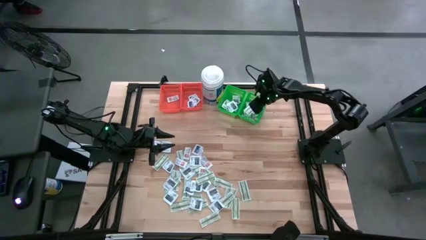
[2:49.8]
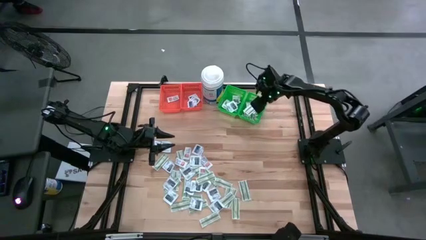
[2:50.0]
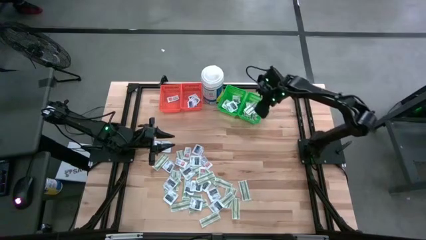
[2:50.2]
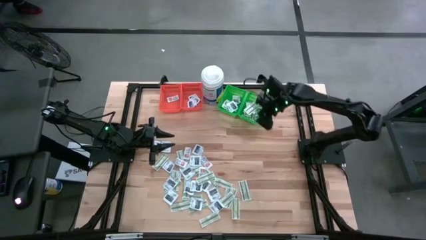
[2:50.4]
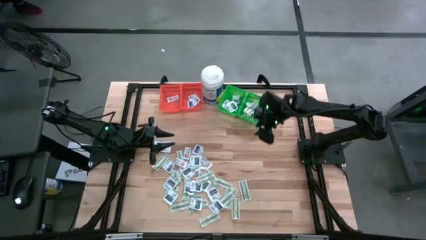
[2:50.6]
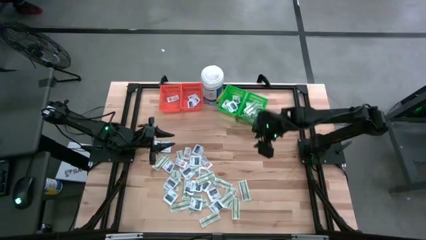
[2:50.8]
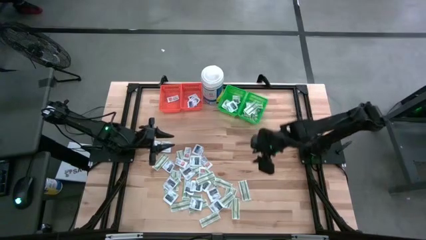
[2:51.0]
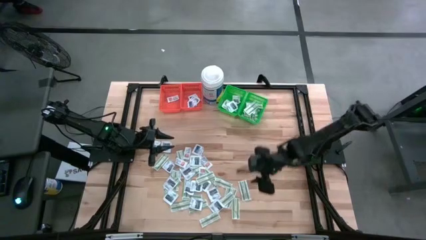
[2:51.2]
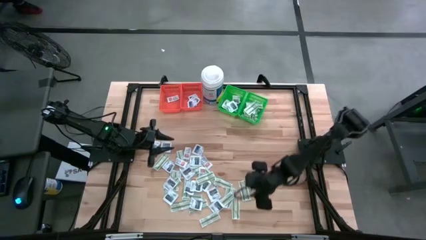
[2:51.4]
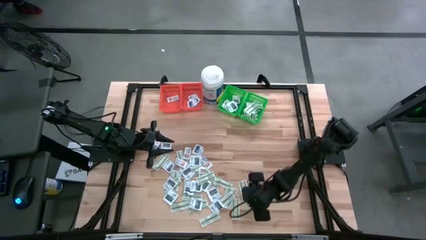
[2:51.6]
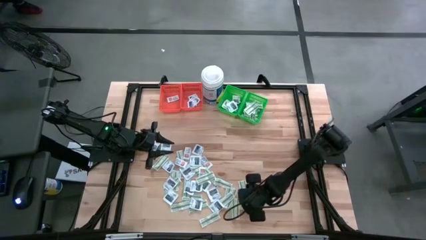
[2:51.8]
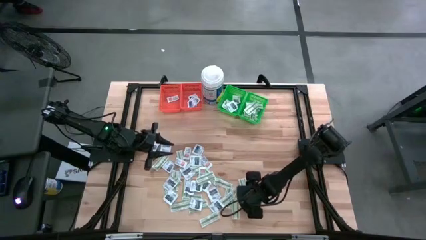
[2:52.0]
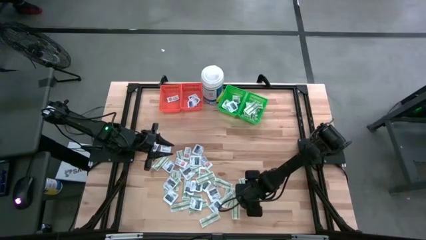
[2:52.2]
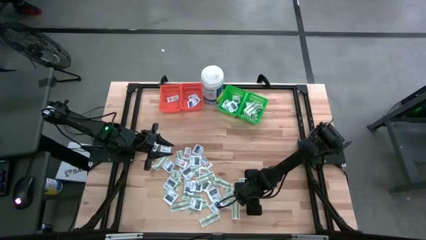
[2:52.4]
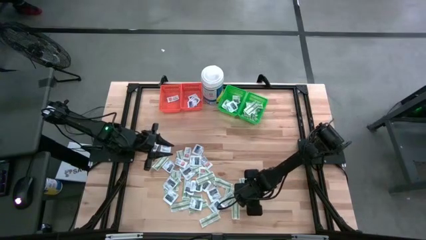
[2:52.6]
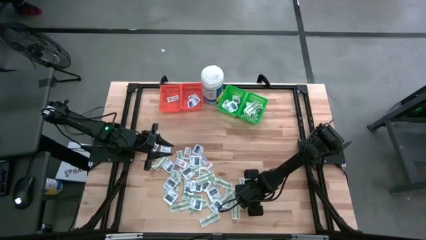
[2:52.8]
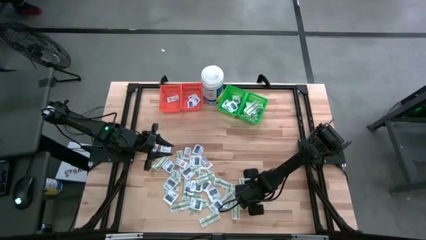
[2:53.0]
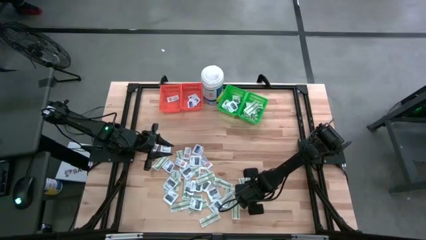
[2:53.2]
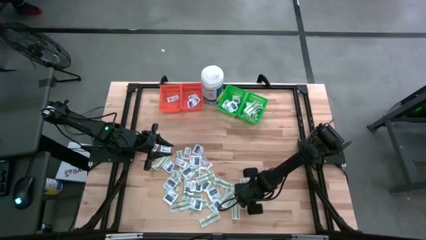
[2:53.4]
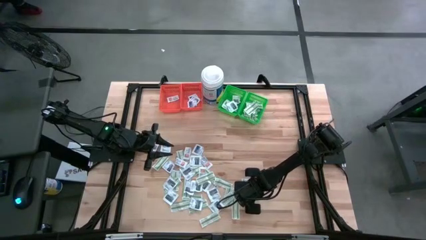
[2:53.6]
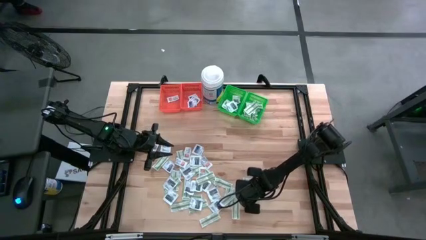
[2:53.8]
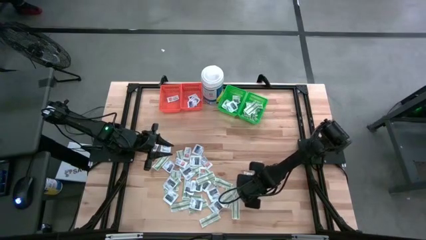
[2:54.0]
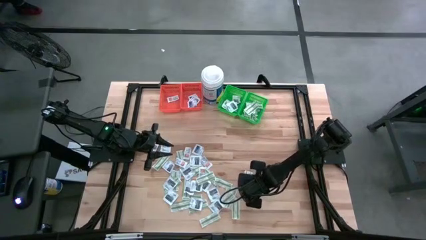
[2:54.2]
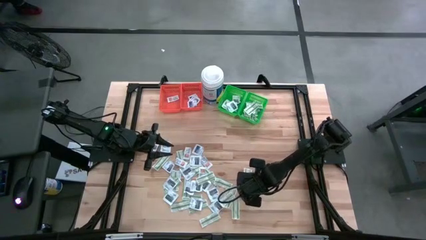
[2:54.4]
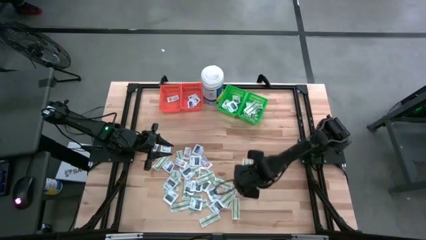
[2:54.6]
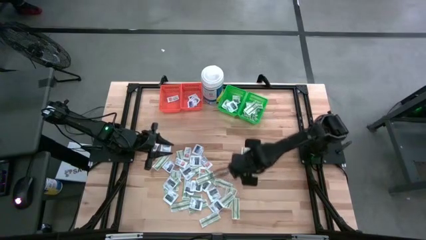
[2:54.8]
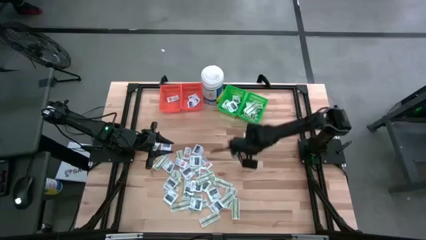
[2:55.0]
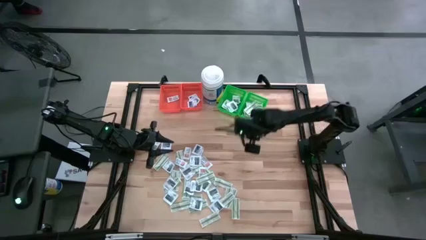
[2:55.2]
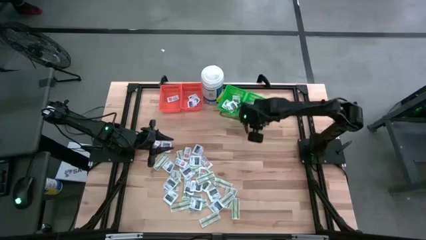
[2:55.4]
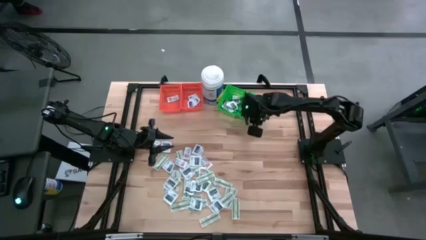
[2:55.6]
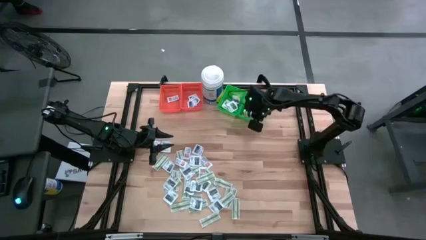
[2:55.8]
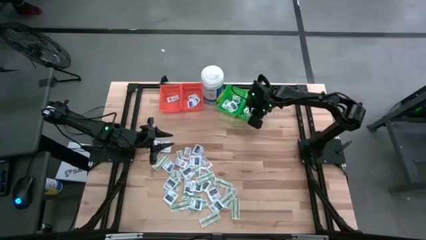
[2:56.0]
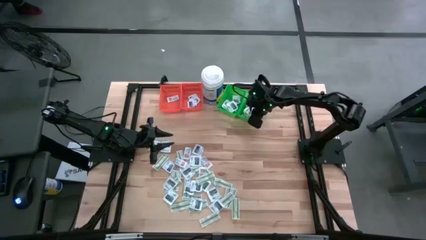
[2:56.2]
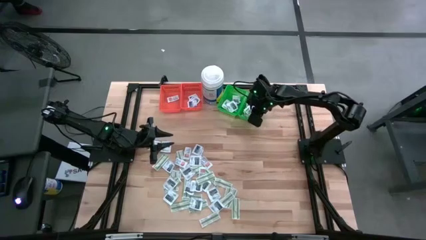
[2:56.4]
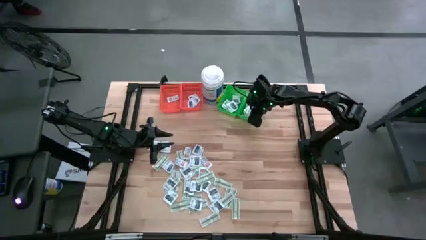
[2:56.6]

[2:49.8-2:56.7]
Task: Pick & Place First Aid Supplies
Put the green bandage pack into the right green bin

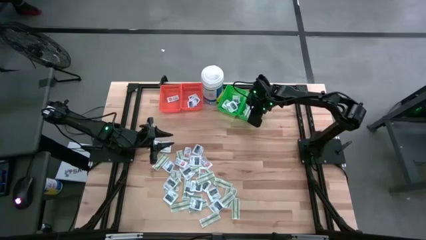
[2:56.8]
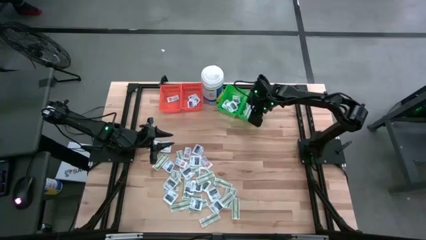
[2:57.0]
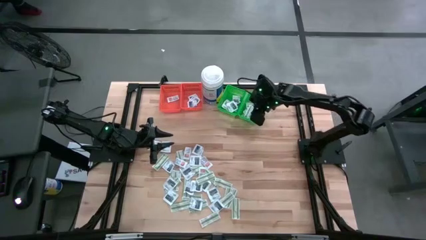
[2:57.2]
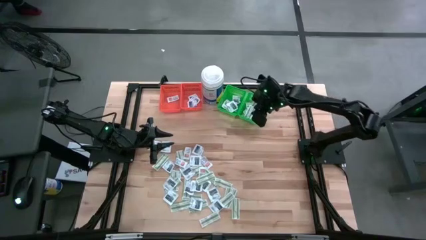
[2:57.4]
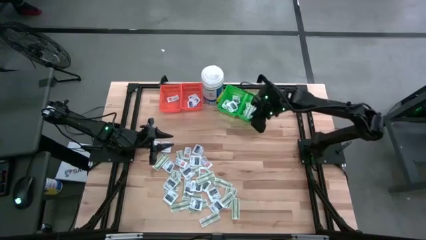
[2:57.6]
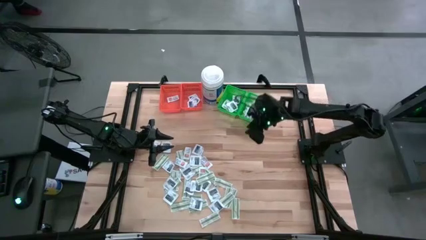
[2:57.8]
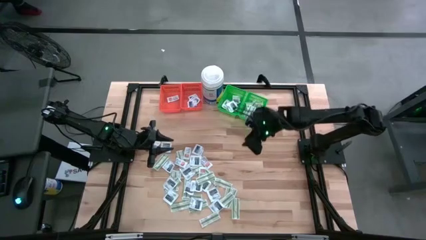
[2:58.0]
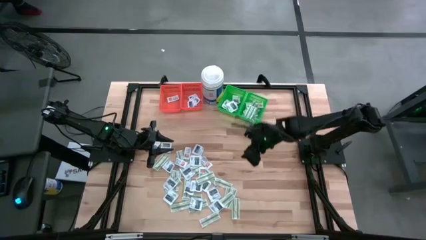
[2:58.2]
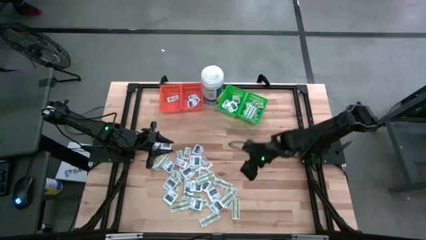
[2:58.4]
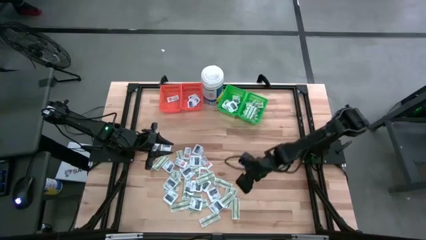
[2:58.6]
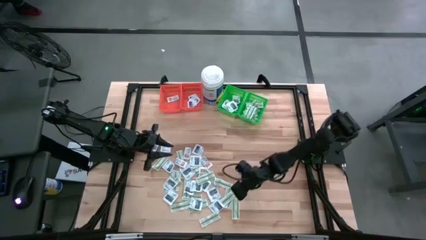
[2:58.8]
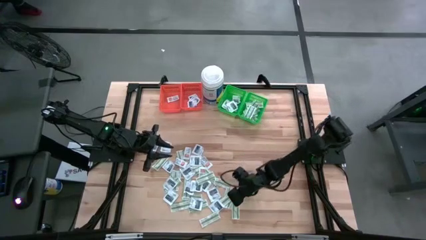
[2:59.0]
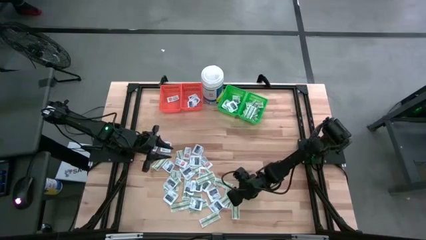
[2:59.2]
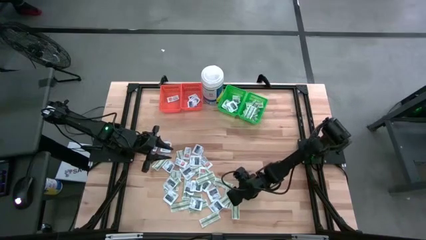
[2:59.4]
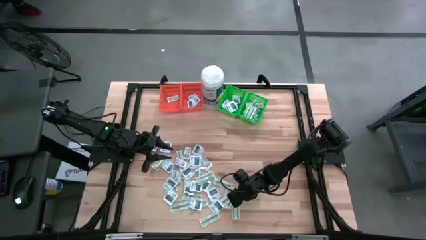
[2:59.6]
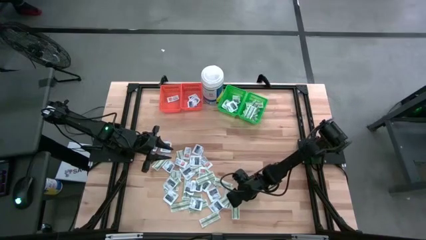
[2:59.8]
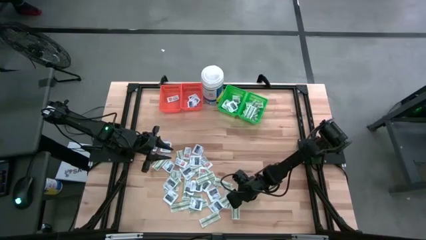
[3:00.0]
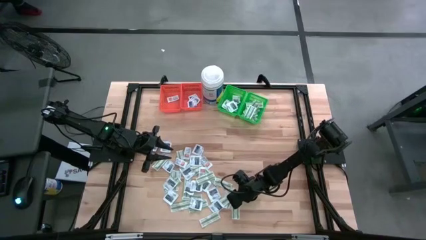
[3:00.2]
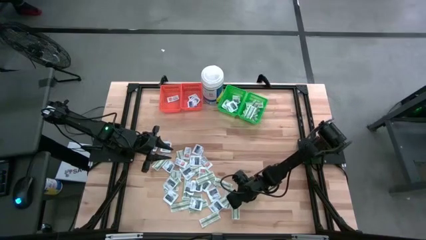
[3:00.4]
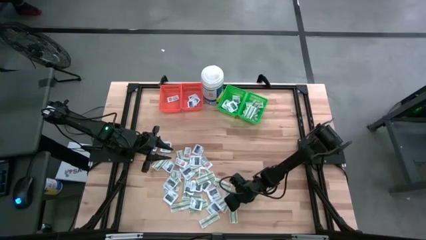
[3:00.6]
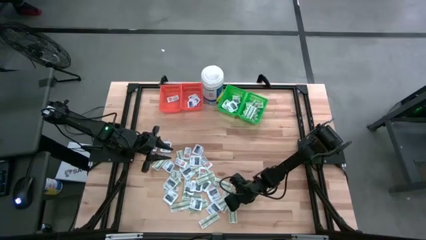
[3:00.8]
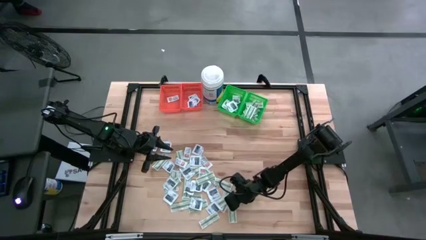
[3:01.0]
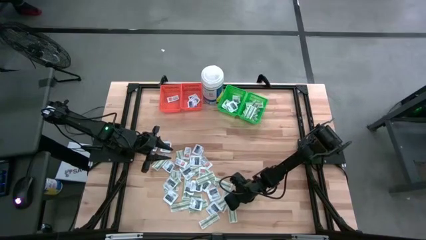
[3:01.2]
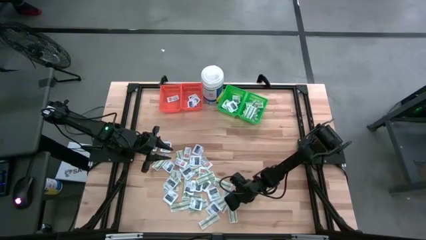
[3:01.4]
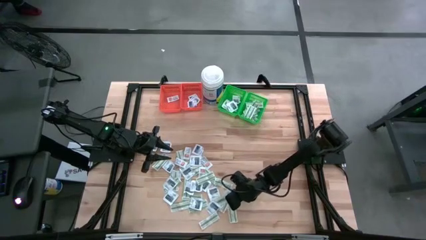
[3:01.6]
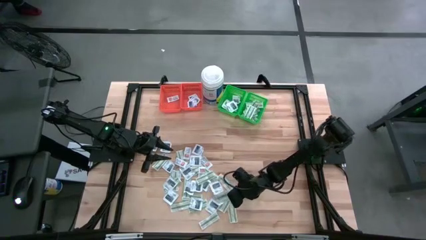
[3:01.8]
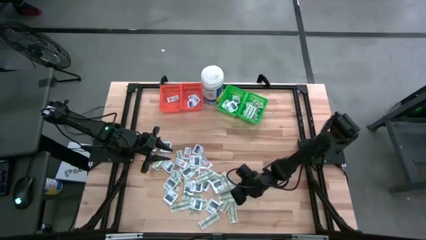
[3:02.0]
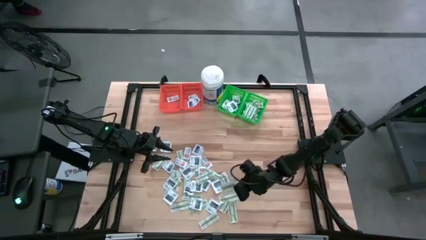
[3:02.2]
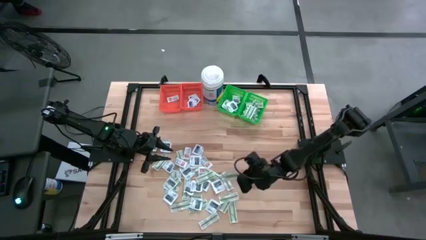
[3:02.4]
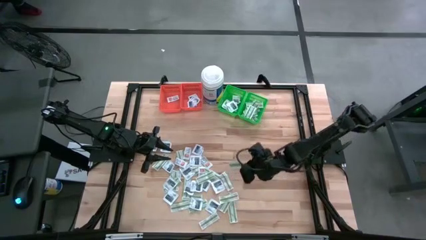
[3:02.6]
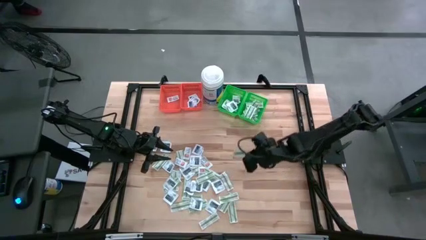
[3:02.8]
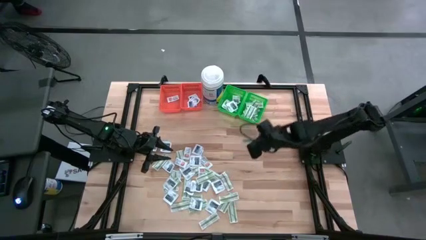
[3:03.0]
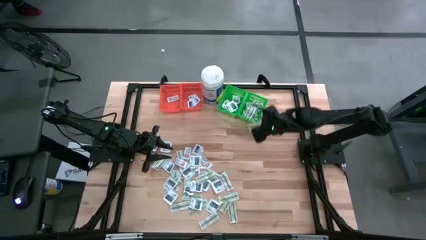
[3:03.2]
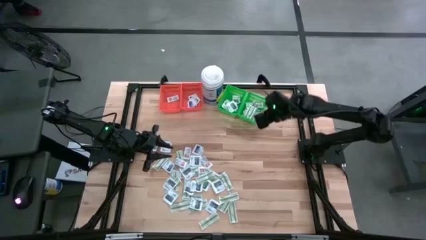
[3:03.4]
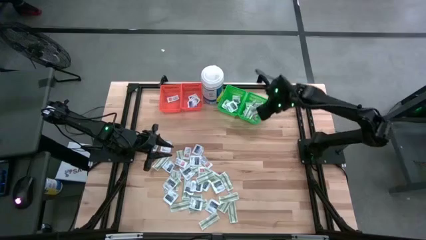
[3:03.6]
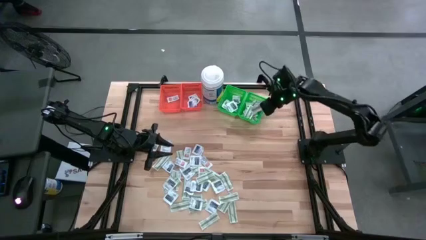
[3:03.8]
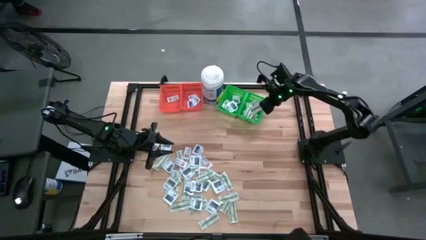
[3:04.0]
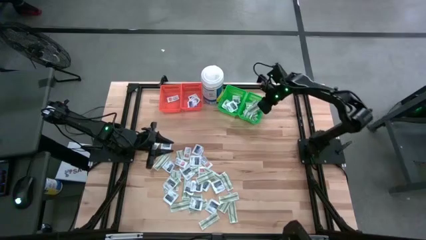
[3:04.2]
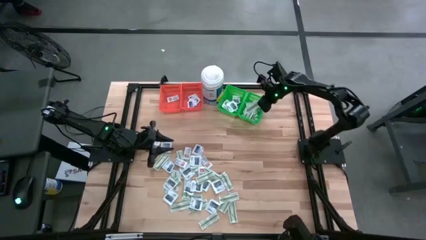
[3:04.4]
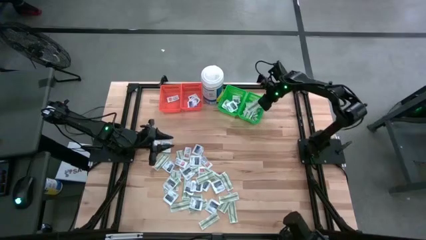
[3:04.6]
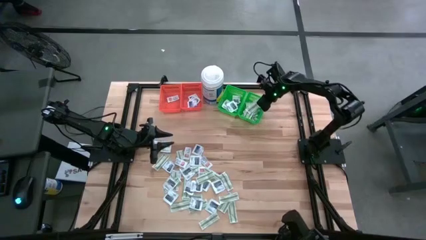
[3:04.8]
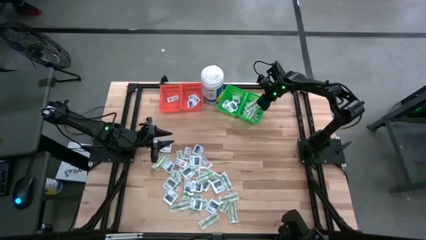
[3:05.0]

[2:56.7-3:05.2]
Put the green bandage pack into the right green bin
